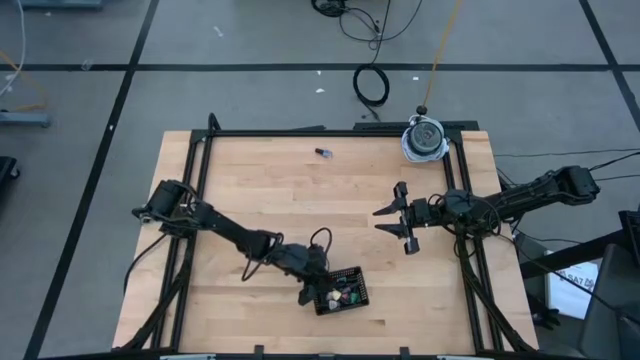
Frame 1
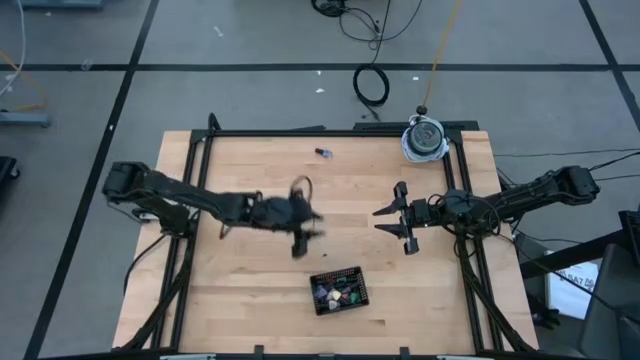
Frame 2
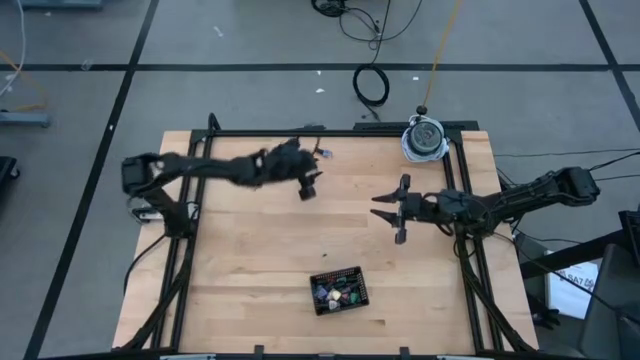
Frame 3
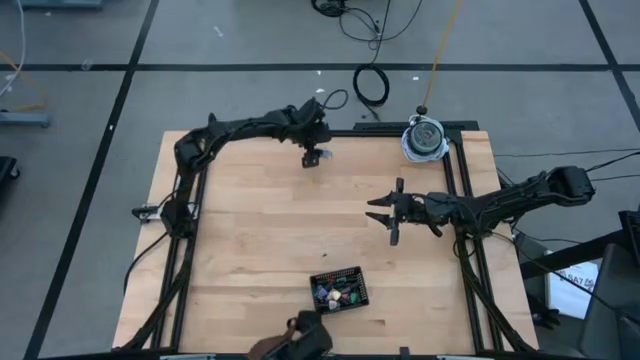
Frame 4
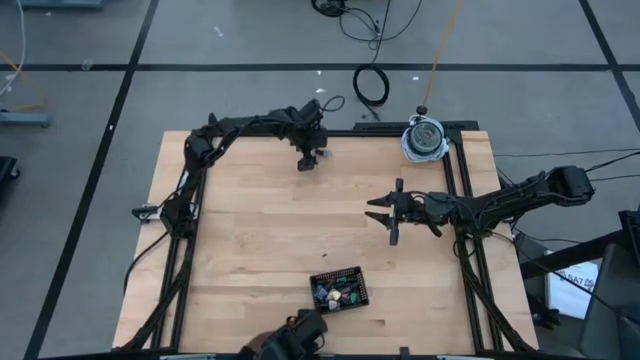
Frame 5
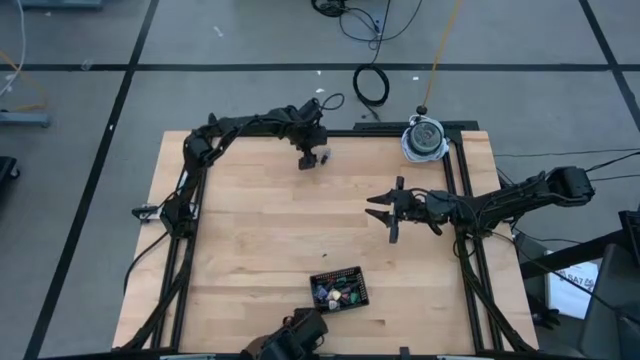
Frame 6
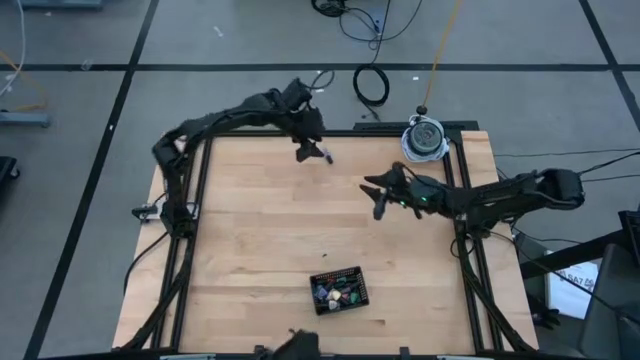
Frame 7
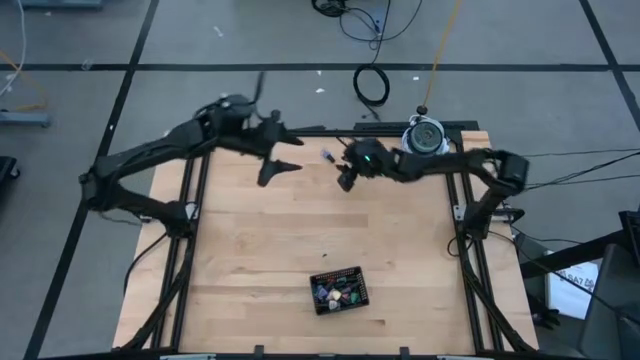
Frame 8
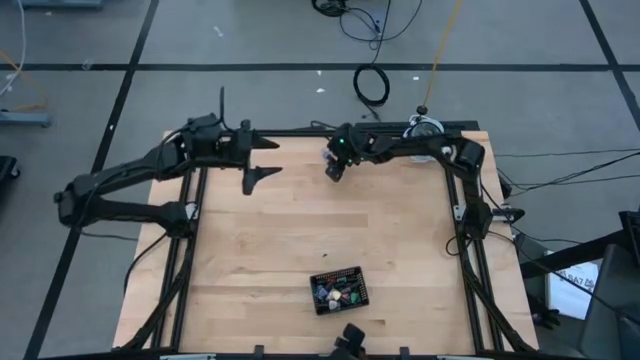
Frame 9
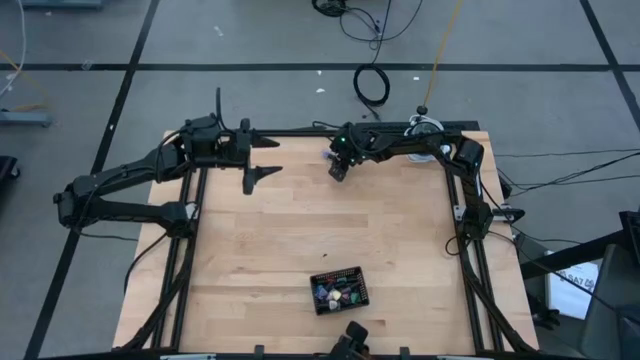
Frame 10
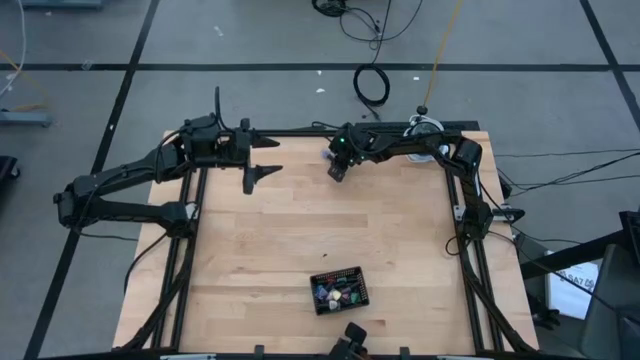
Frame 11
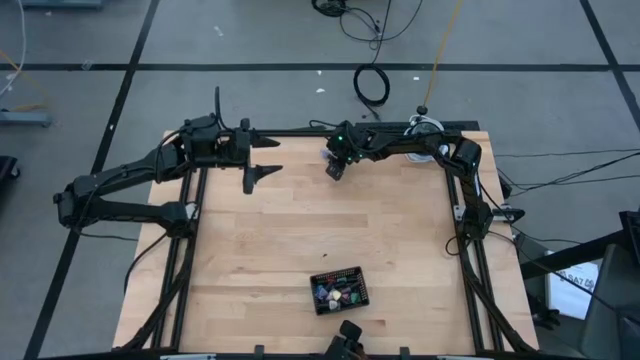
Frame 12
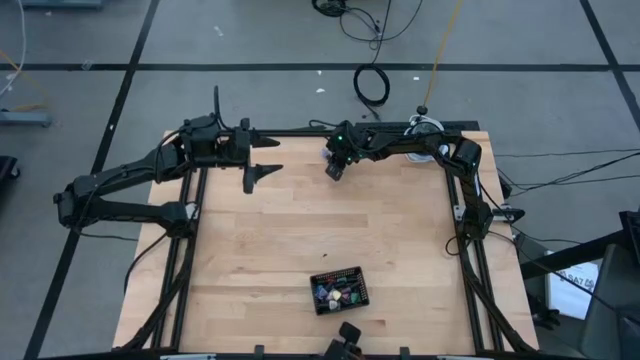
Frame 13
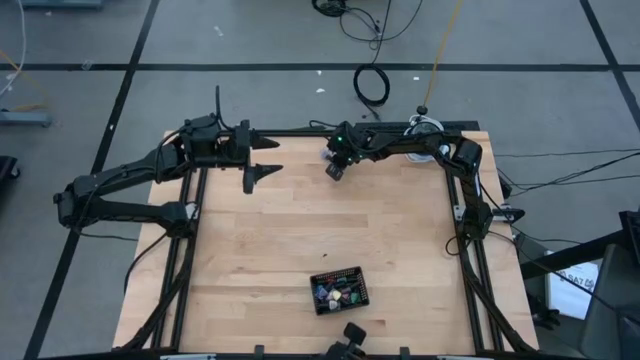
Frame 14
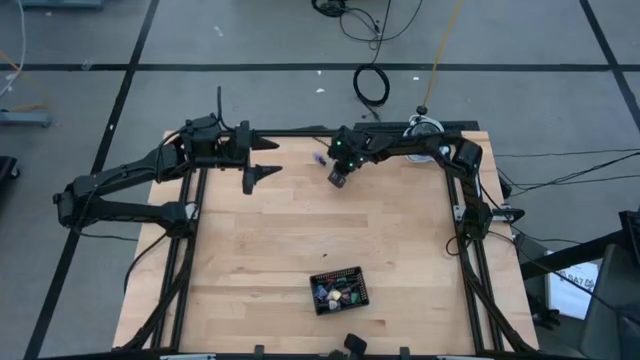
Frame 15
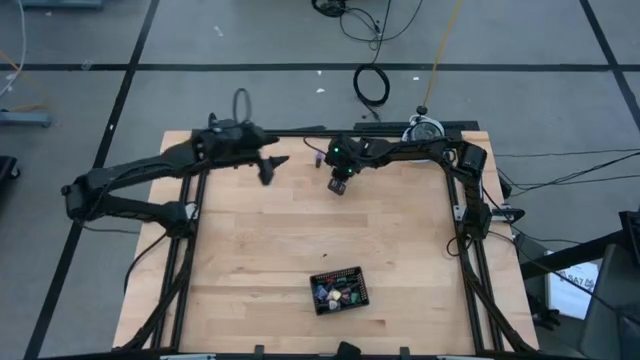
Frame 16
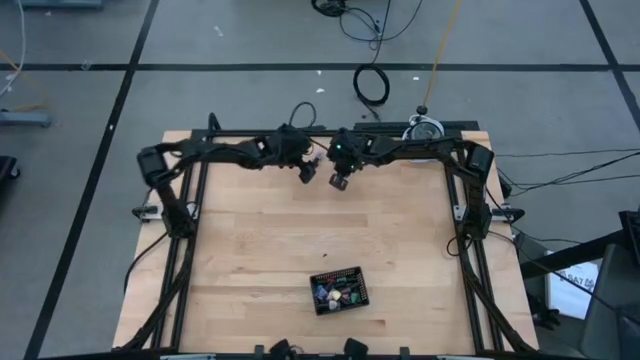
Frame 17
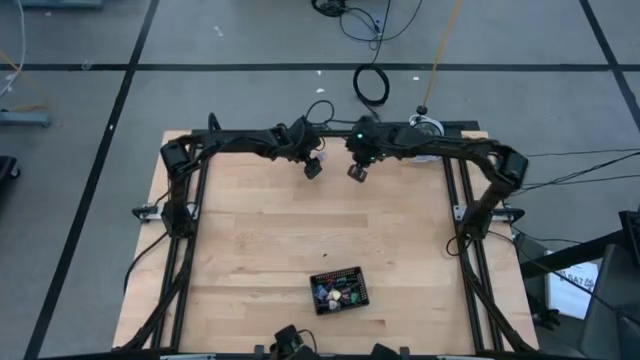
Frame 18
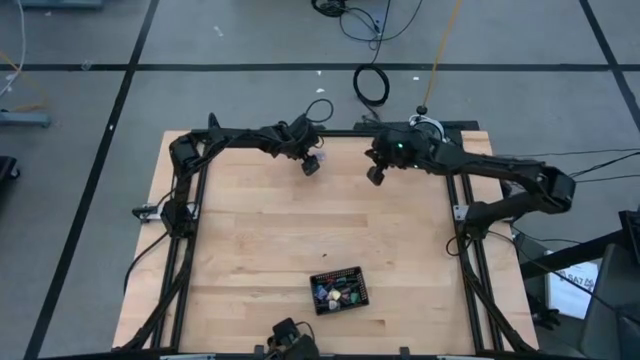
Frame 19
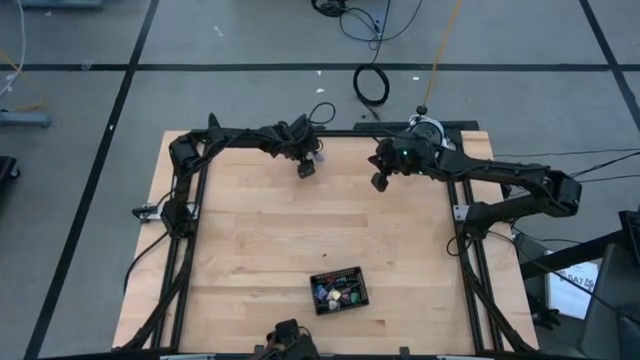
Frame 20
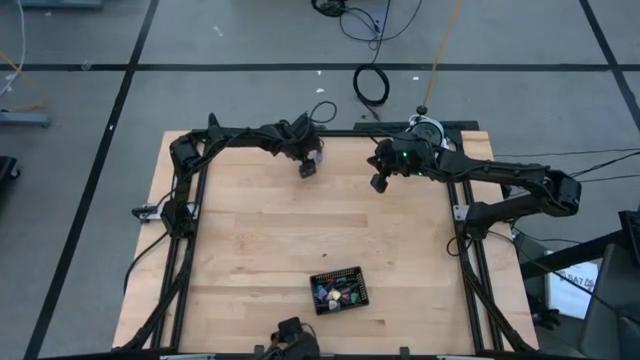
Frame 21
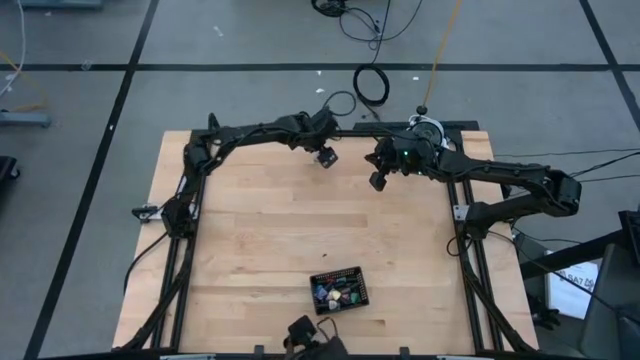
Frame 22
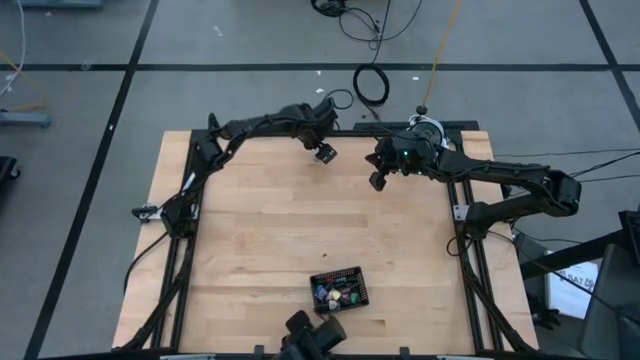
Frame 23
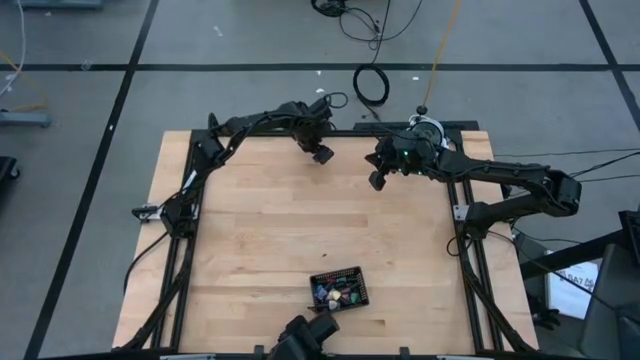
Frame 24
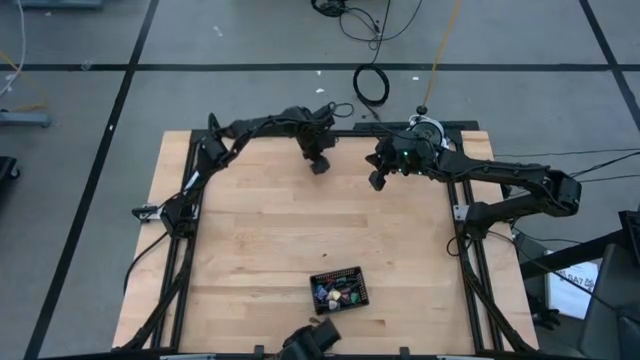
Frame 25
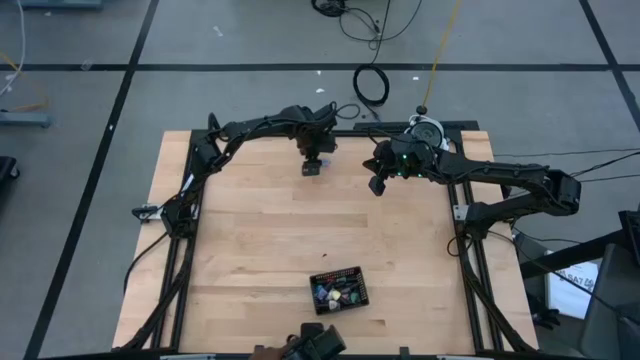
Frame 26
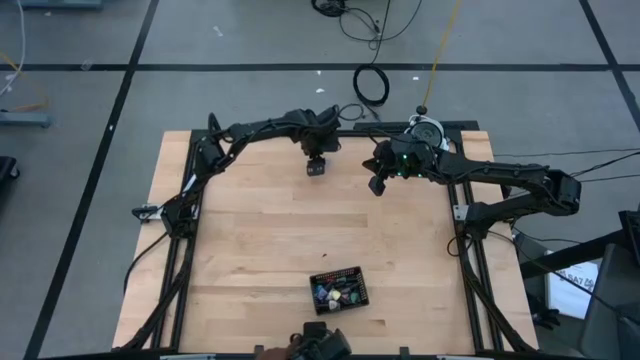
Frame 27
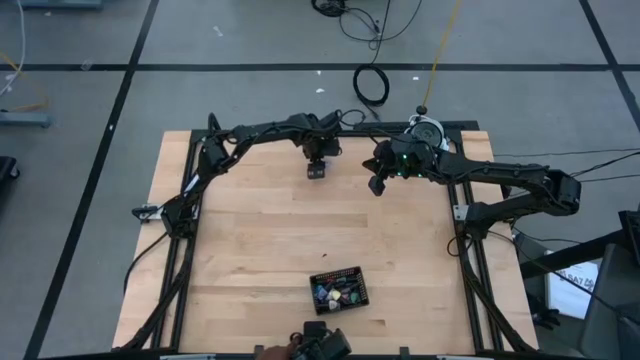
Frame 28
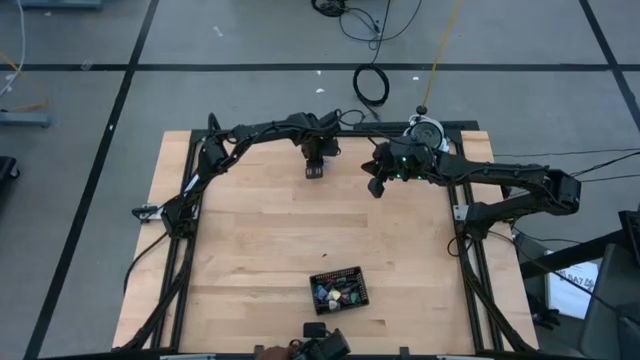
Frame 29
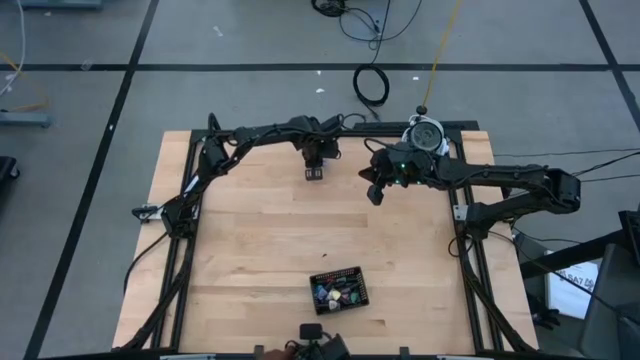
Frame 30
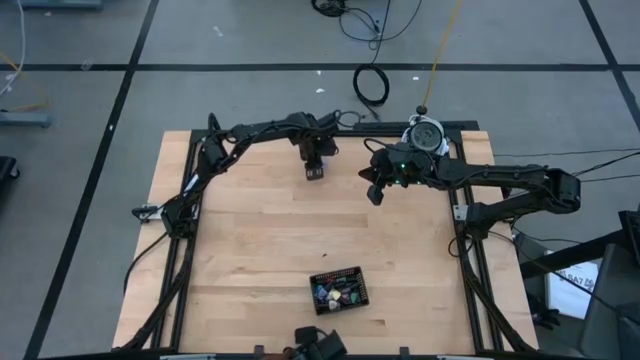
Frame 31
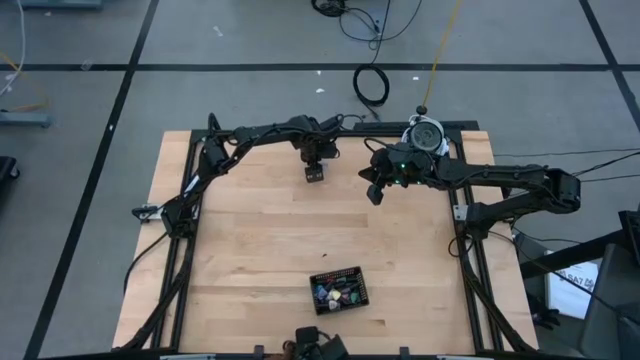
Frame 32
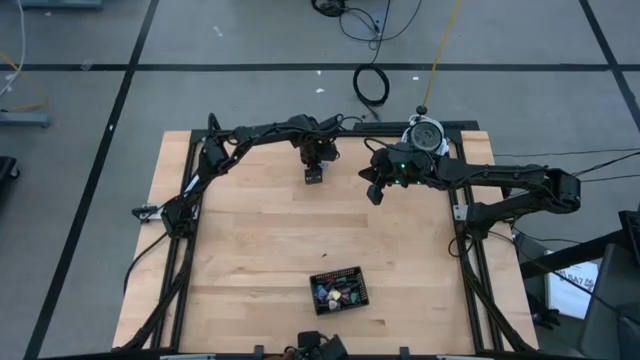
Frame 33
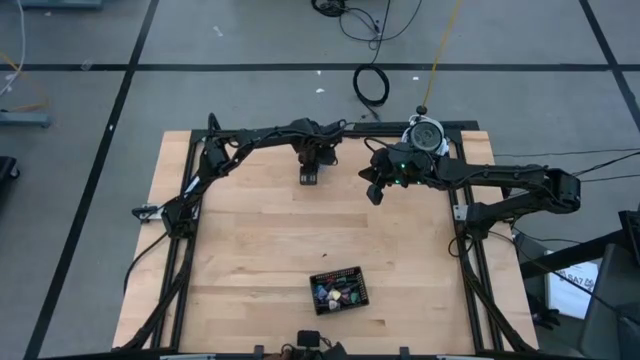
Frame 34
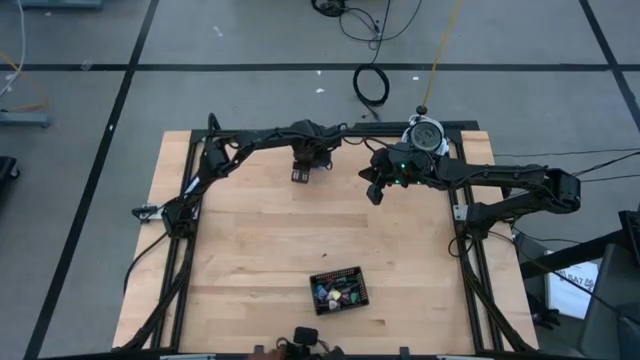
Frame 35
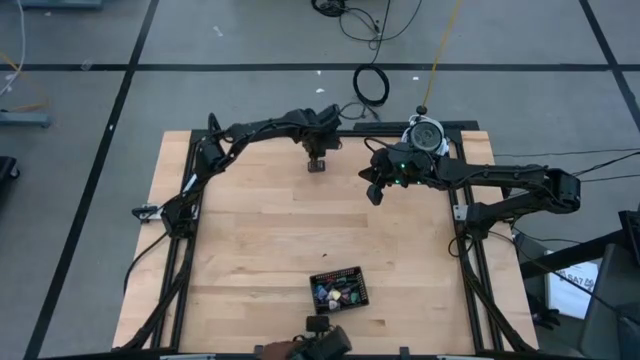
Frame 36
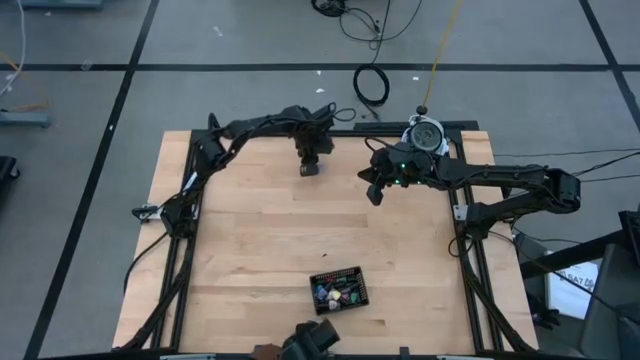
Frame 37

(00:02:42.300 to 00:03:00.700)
Task: Pick & Place Nail Polish
Put the blue nail polish bottle into the black bin

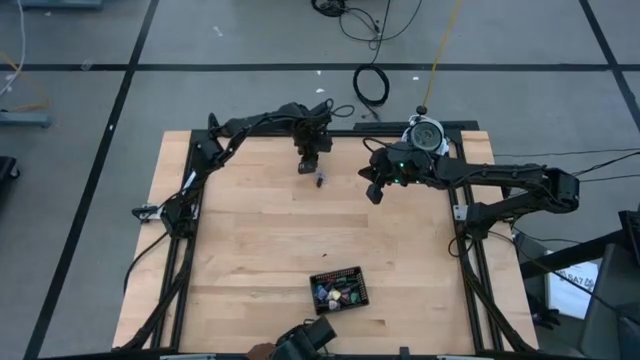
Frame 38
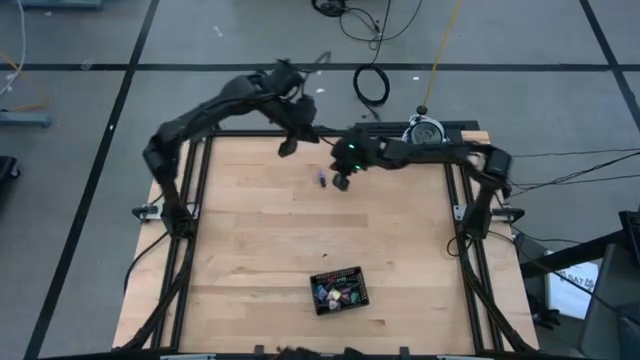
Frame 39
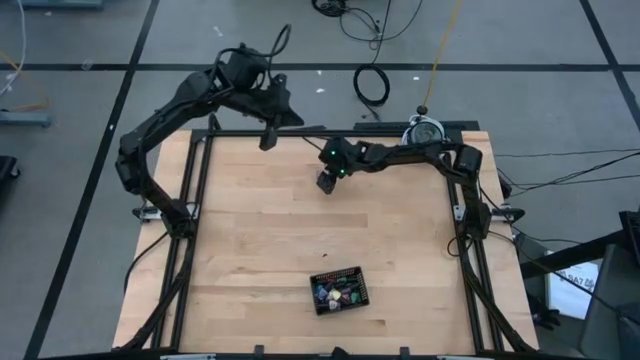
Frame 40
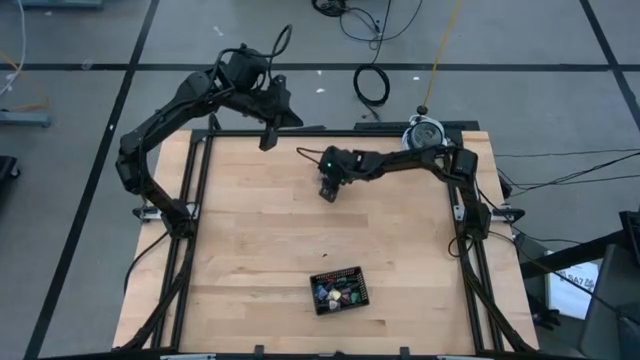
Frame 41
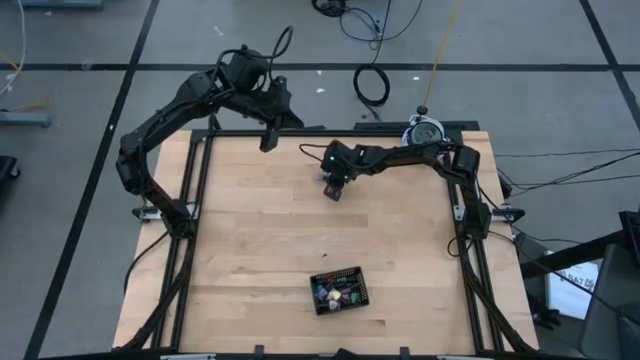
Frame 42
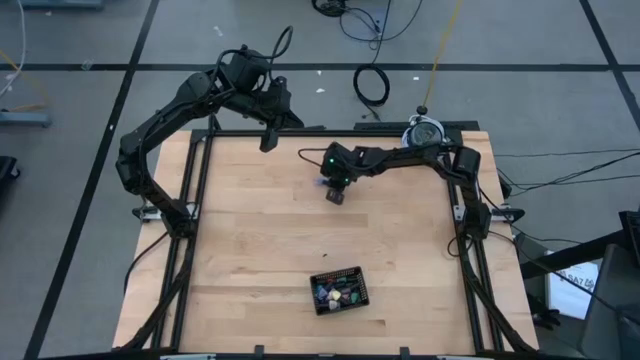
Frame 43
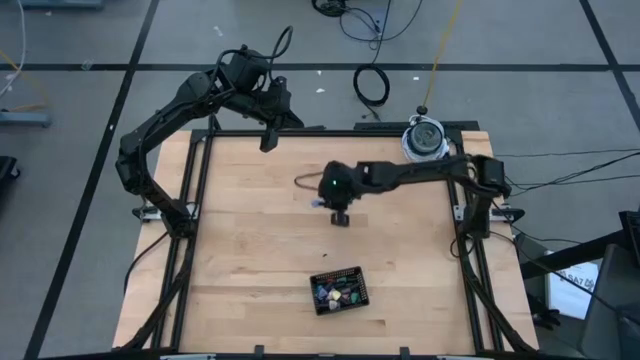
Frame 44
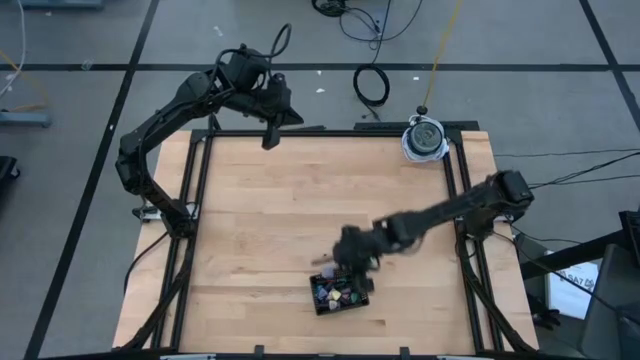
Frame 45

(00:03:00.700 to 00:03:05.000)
Put the blue nail polish bottle into the black bin
